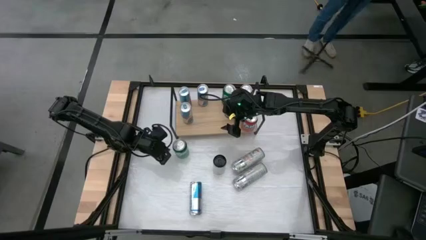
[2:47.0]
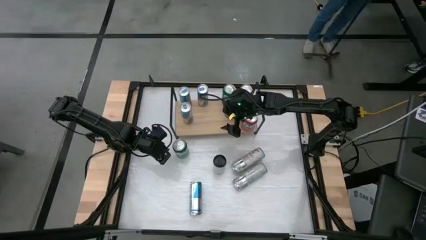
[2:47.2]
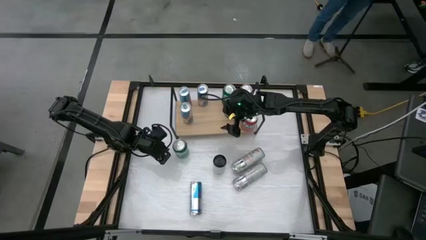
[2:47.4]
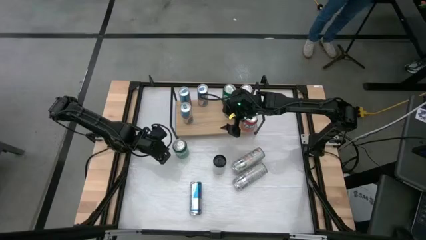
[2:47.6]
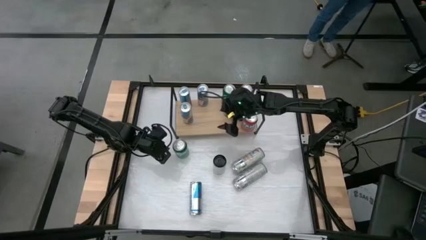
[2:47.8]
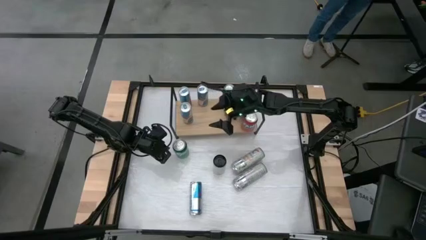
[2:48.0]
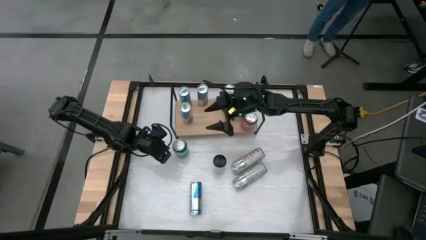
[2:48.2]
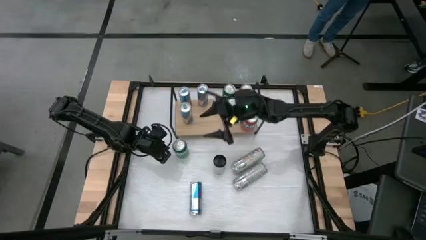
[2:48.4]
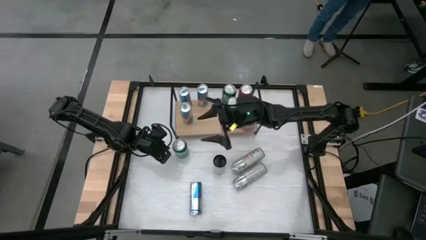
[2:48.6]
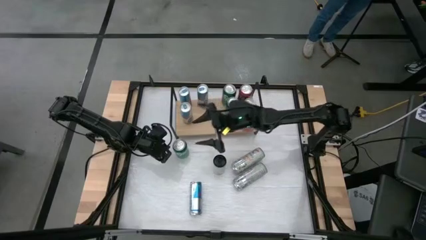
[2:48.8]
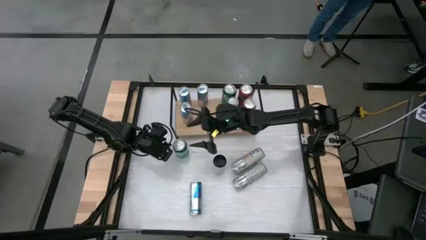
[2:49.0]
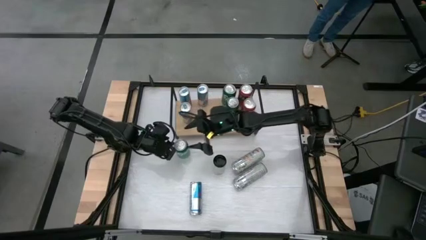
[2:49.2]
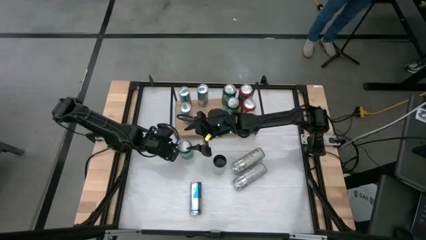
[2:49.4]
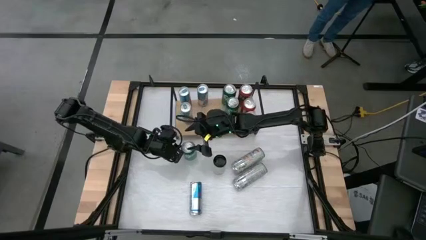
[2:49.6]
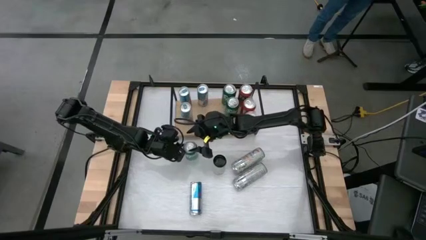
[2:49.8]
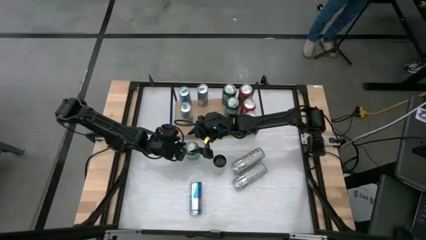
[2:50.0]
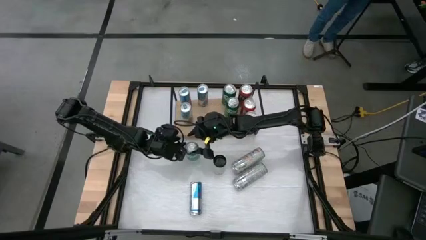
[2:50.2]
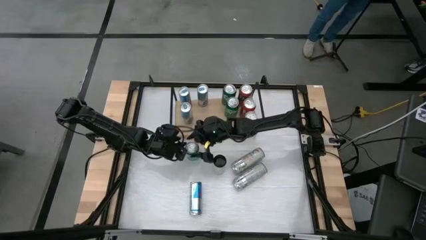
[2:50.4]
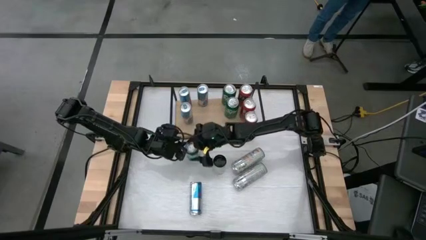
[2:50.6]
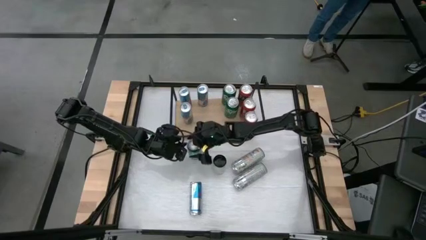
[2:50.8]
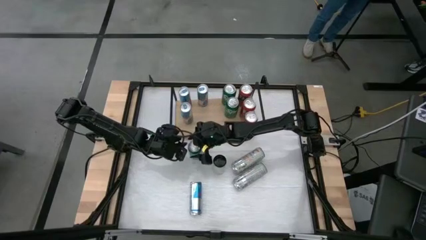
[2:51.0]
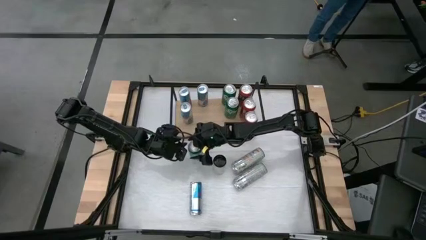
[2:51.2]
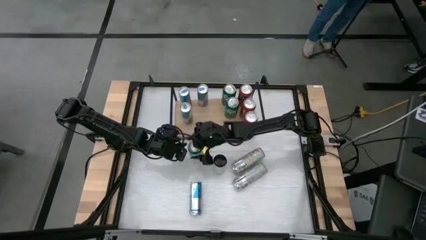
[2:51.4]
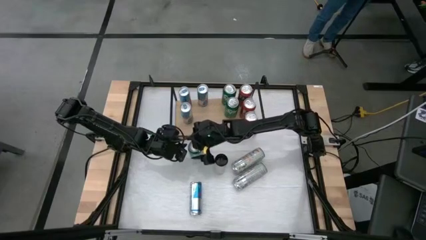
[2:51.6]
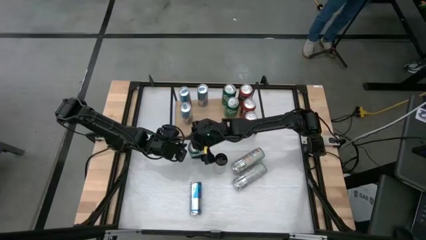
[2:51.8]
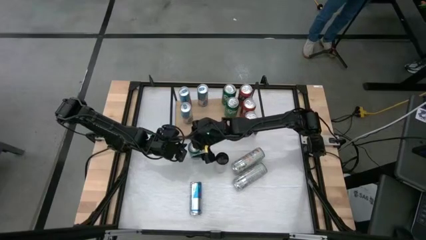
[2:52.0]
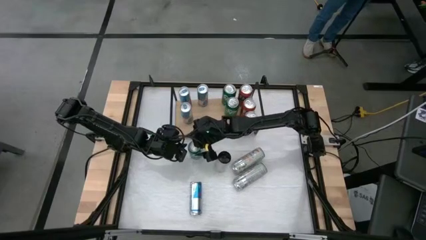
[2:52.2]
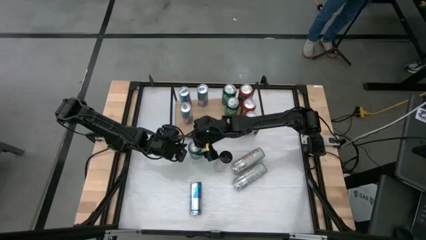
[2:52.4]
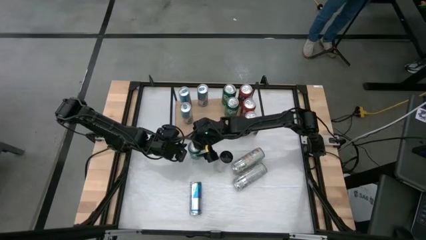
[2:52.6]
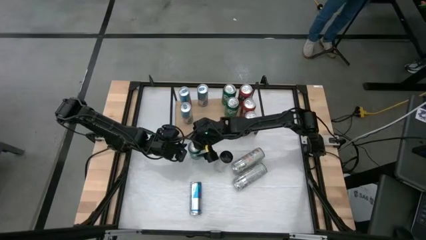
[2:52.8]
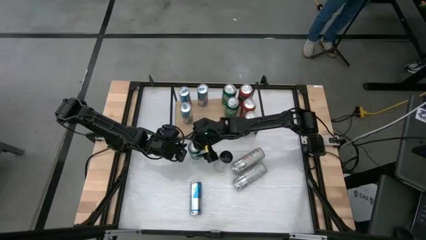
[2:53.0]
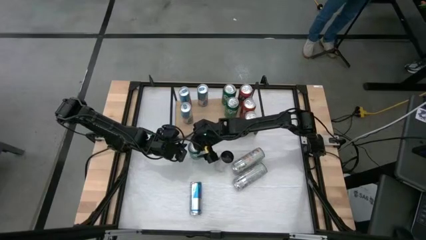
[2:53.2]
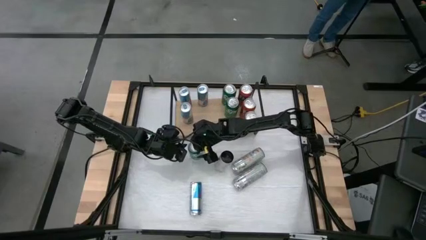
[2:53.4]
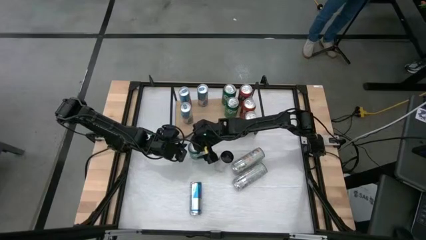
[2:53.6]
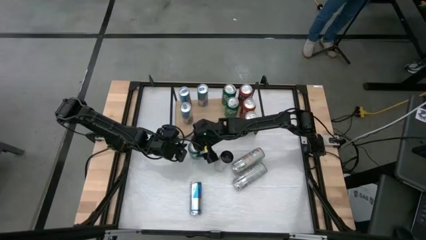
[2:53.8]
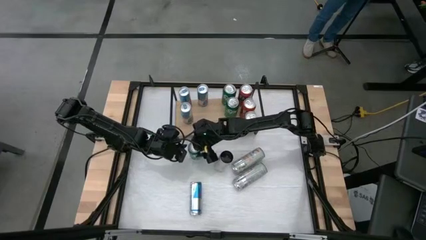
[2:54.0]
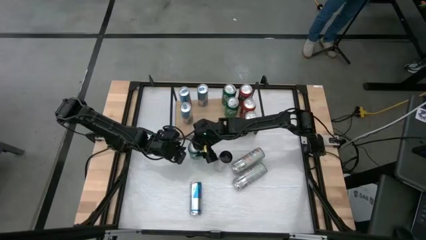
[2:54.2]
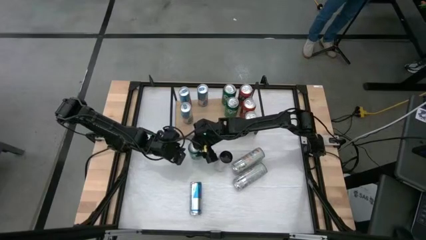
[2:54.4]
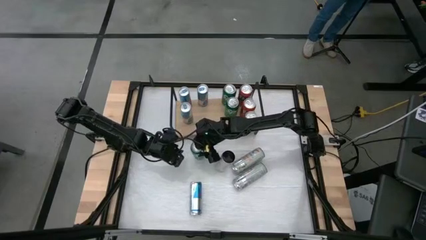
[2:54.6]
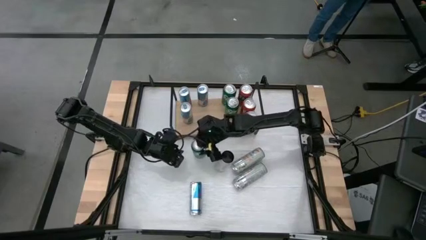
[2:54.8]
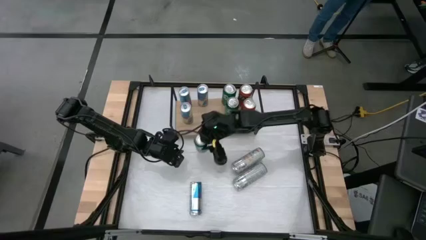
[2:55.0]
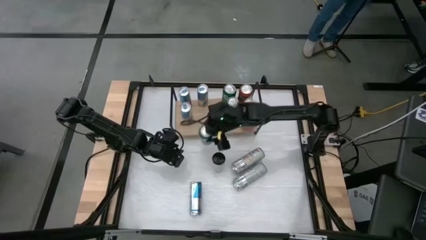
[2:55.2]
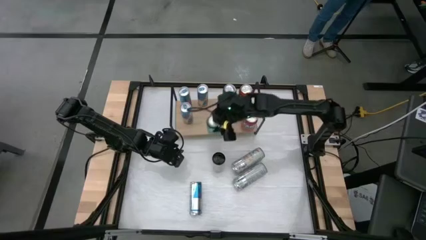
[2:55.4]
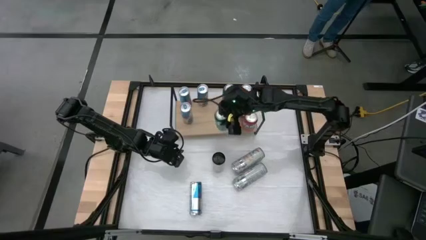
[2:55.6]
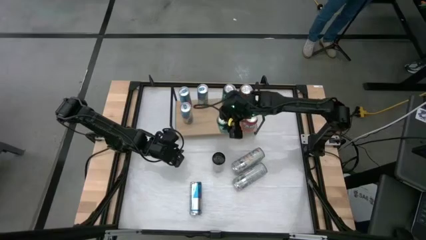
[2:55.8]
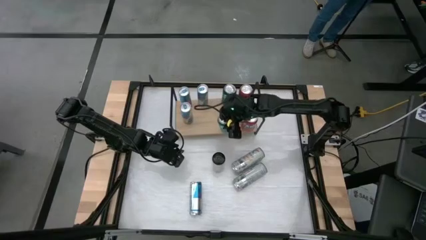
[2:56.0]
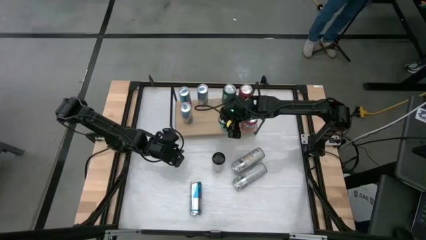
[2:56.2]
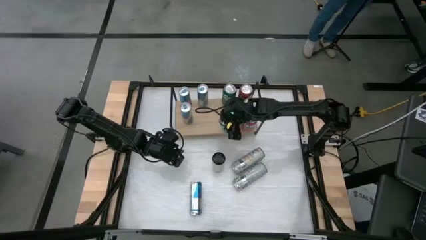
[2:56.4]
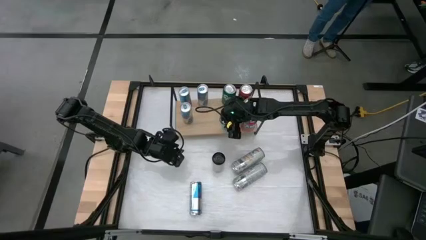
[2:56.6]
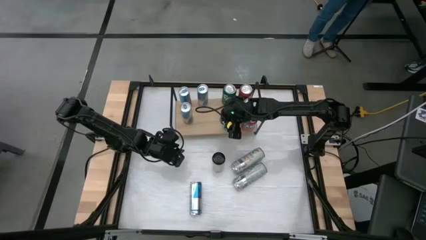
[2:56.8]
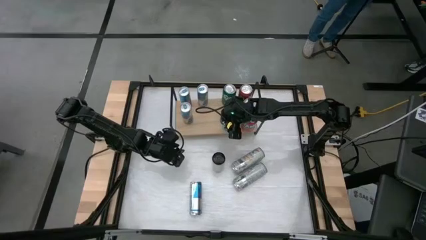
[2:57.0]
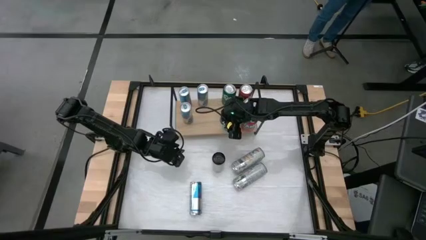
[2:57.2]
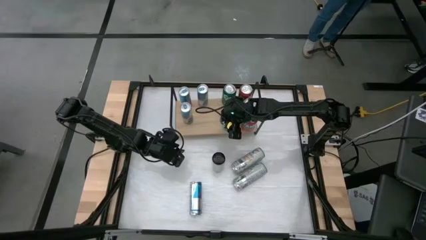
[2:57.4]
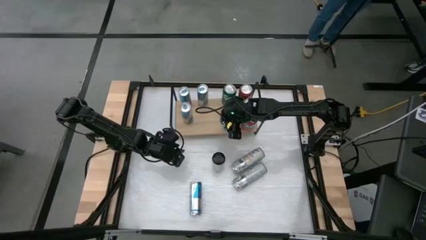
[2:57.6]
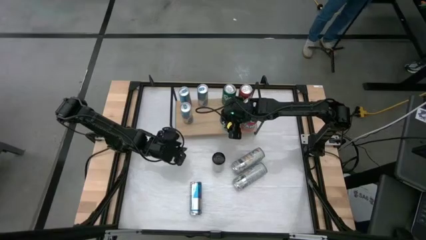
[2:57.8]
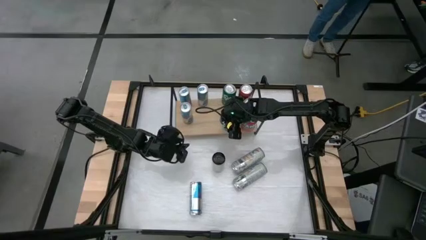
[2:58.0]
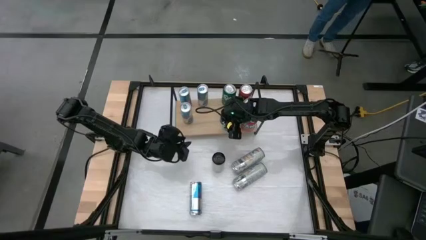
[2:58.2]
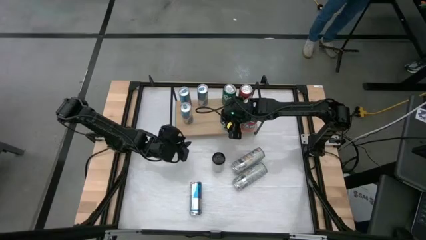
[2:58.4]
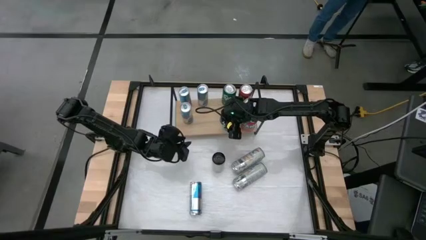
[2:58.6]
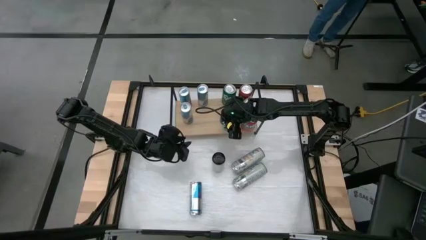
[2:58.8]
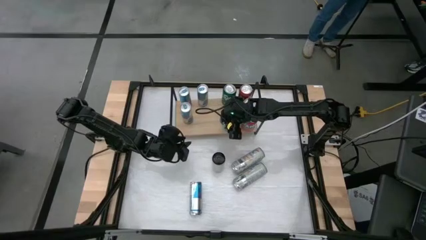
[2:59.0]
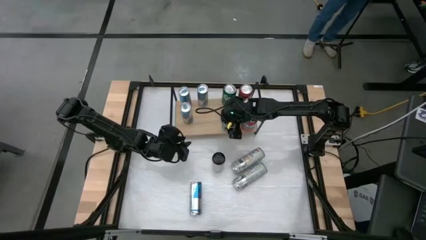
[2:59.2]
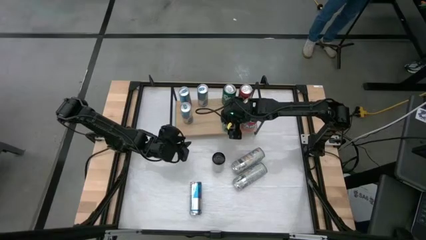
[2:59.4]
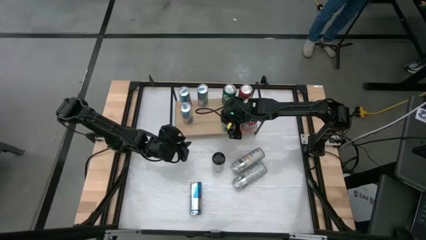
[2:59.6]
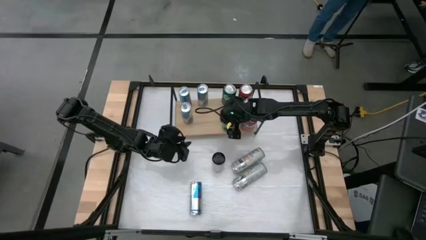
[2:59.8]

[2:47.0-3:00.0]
Task: Sort soda cans
Put the green soda can on the shelf and align with the other green soda cans
